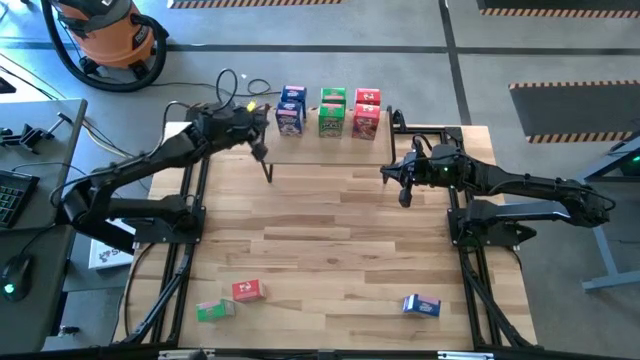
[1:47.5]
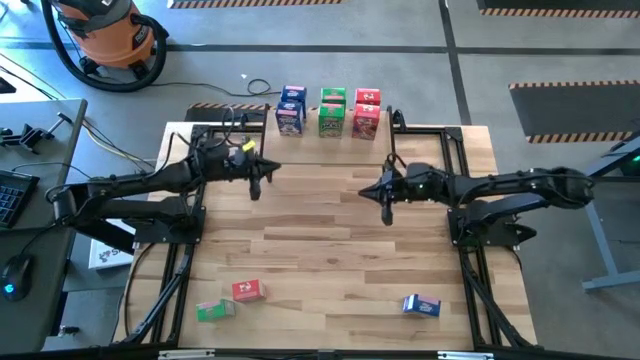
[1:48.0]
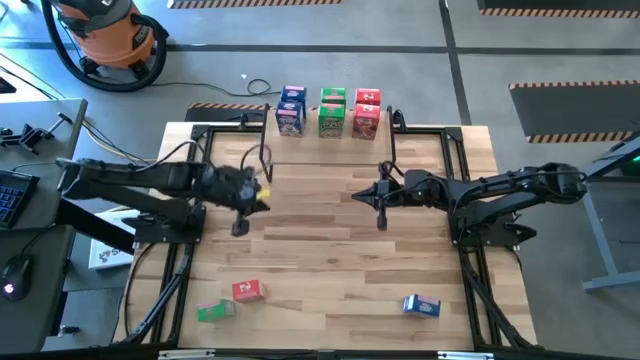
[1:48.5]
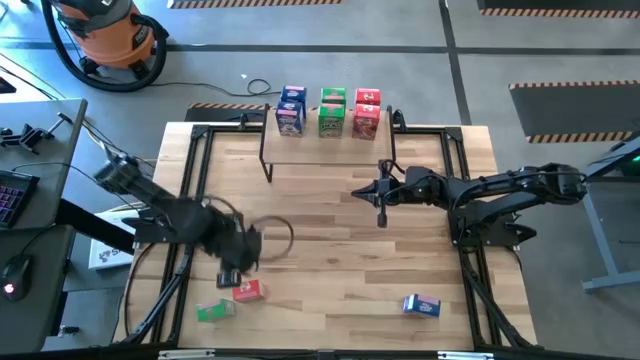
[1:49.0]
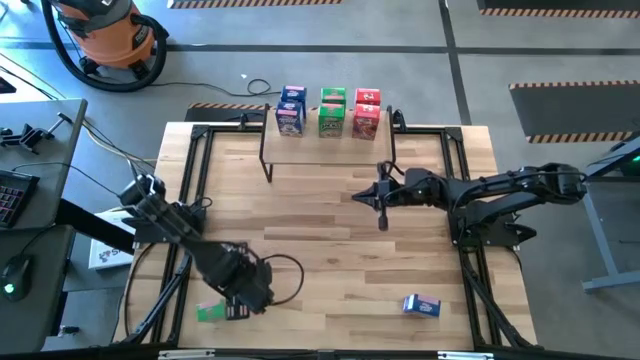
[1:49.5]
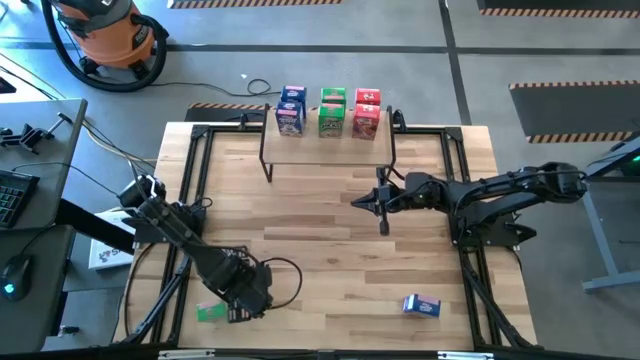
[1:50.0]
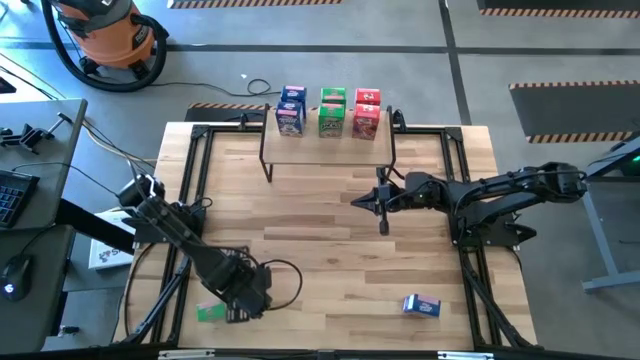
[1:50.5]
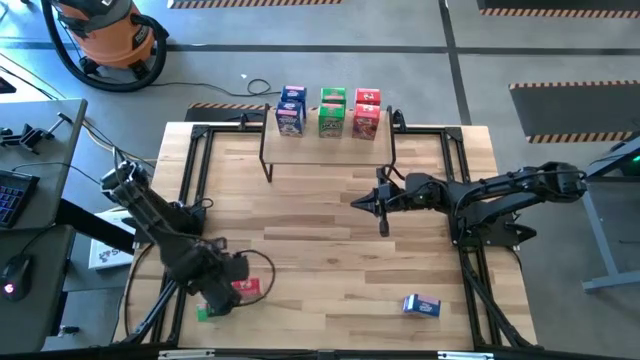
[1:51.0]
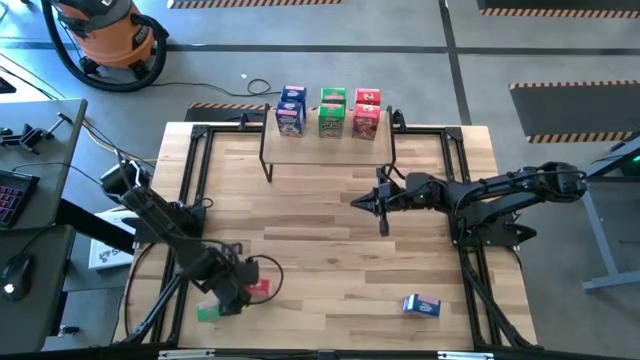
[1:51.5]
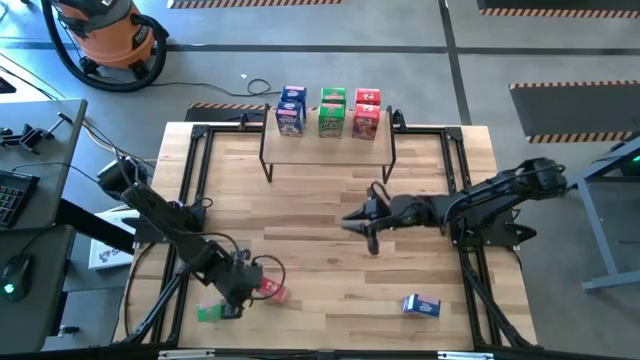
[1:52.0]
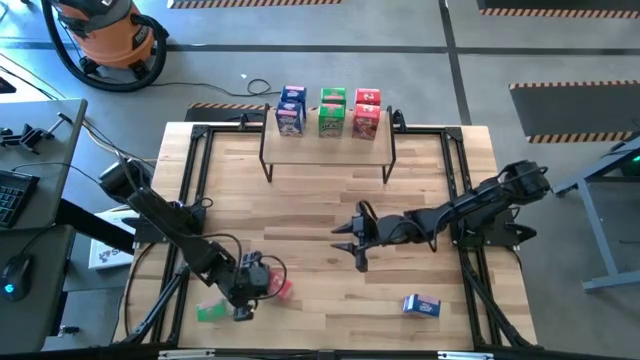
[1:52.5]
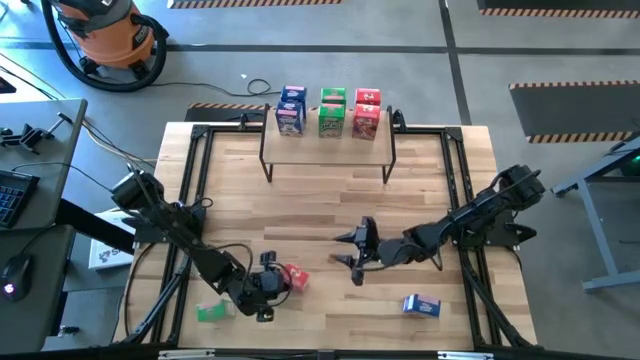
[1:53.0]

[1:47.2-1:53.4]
Task: Stack cereal on shelf
Move the red cereal box to the center of the table

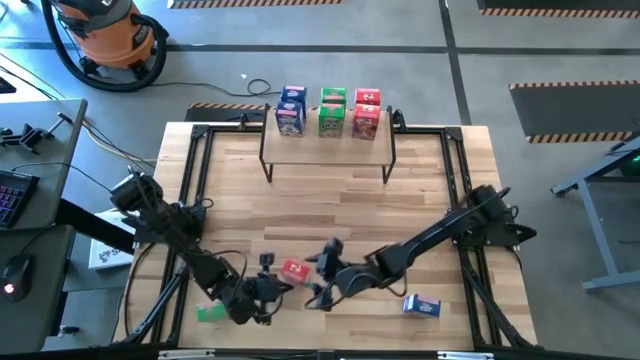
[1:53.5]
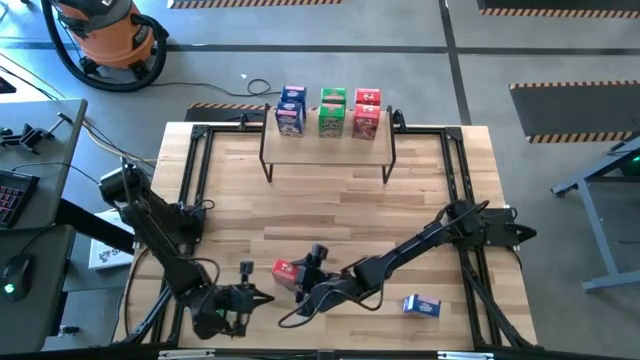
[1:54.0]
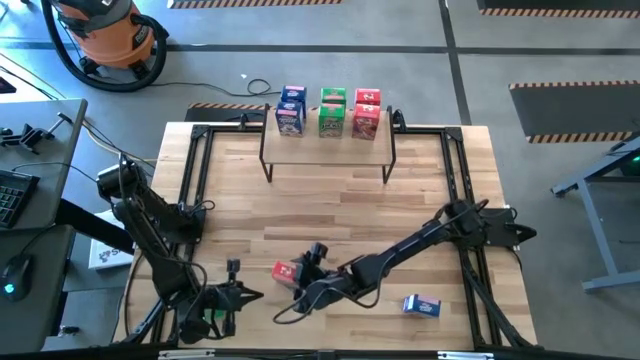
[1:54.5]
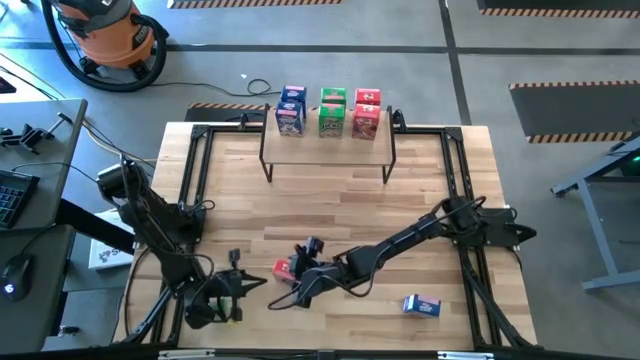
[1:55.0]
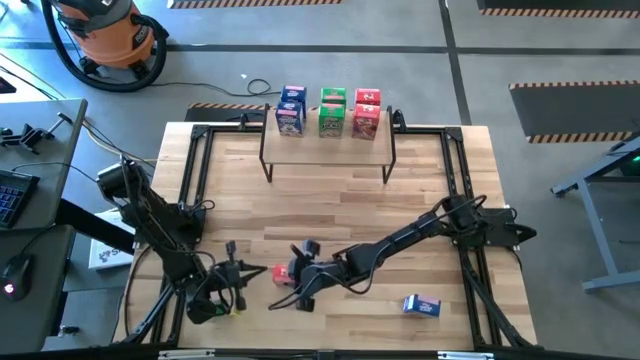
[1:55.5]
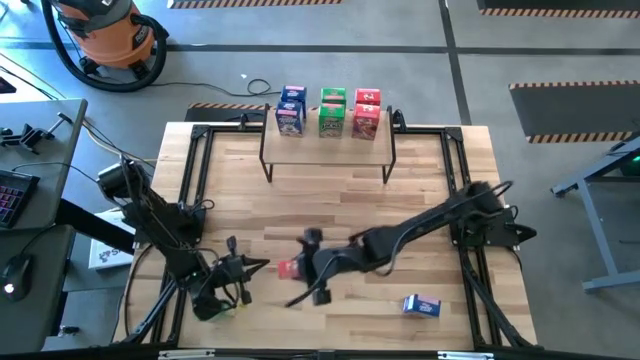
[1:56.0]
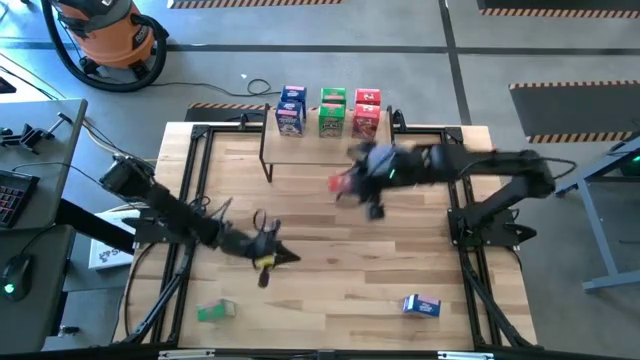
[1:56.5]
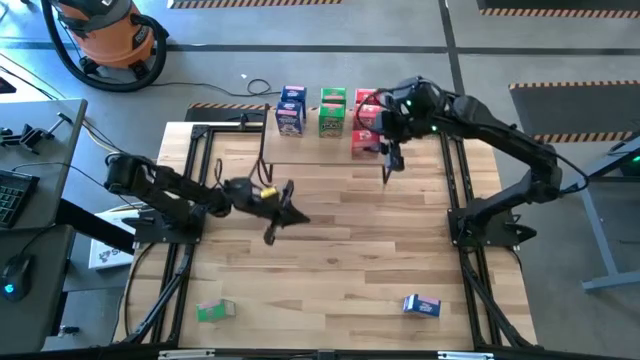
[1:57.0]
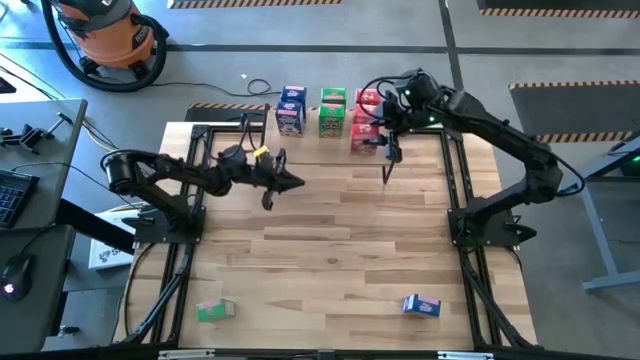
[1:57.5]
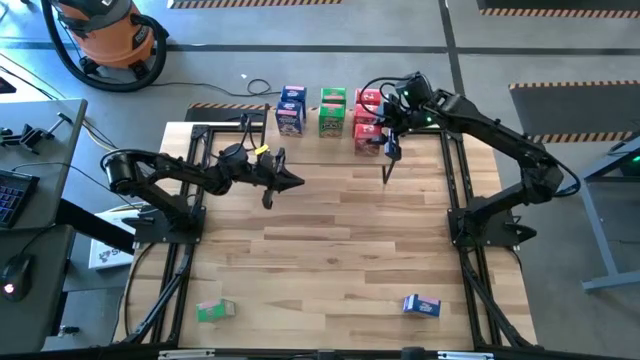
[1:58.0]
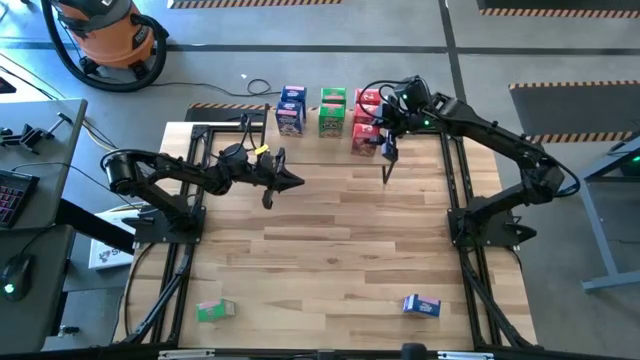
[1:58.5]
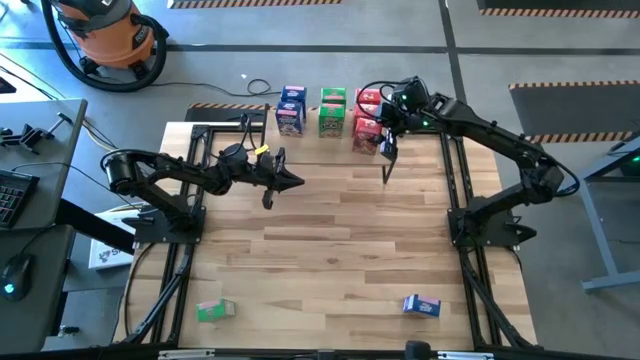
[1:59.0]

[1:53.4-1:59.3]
Put the red cereal box on the shelf aligned with the other red cereal boxes

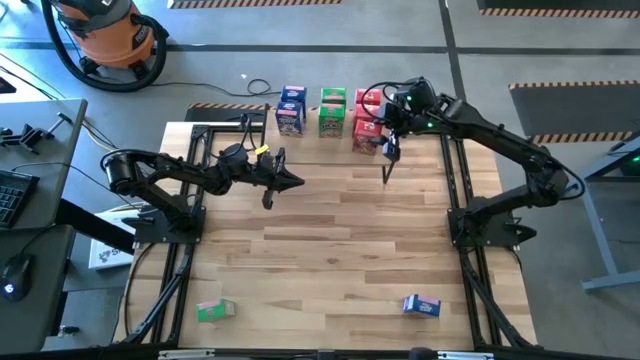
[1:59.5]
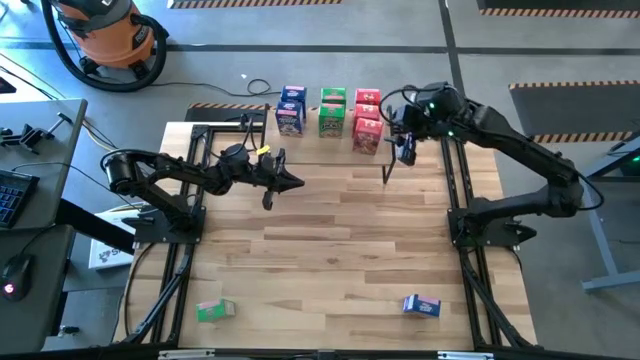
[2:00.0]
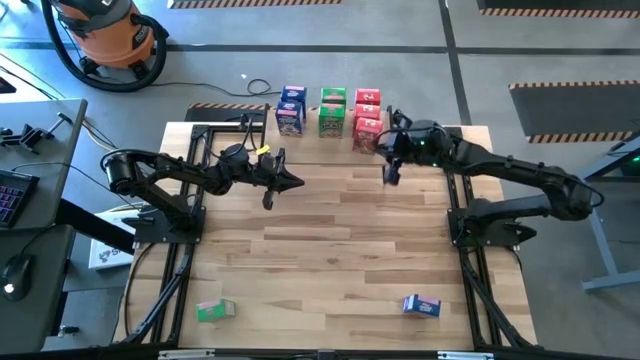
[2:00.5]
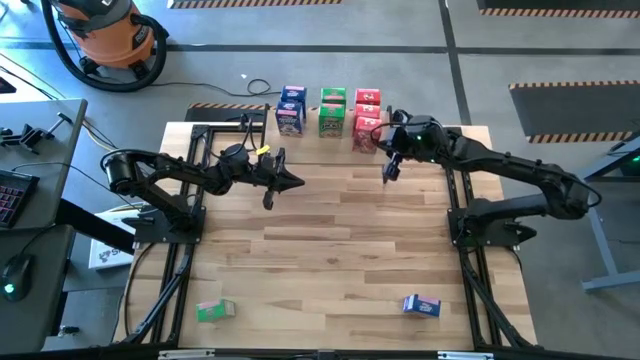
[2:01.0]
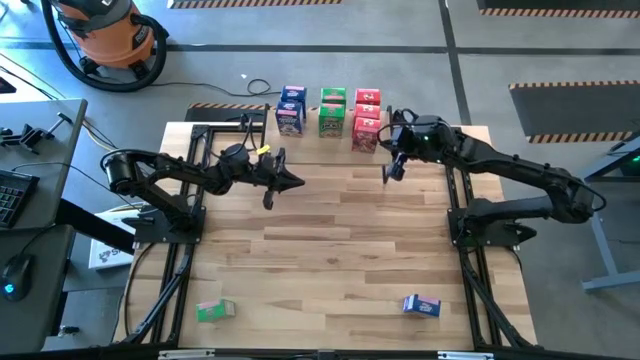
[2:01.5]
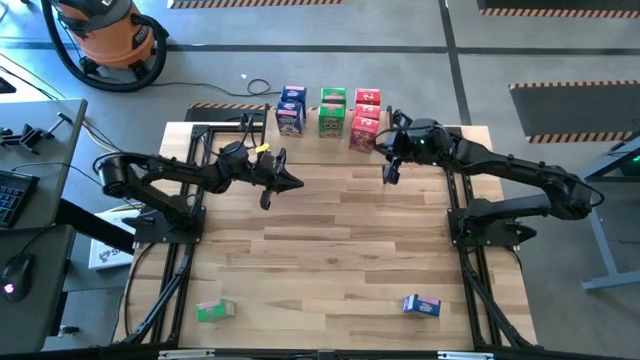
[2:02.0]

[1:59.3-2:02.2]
Adjust the bottom red cereal box on the shelf

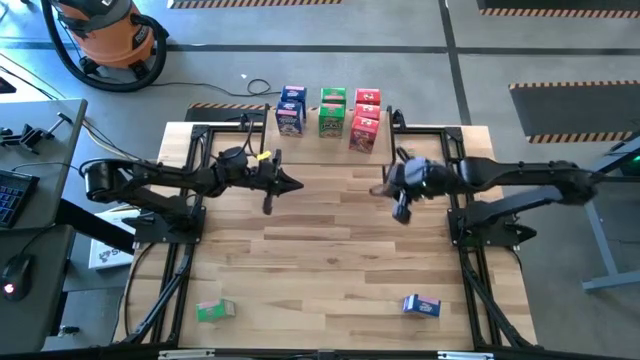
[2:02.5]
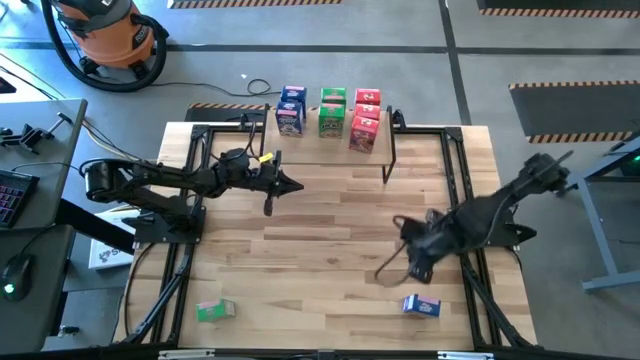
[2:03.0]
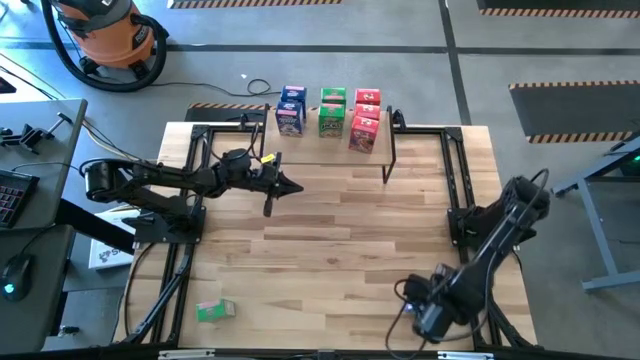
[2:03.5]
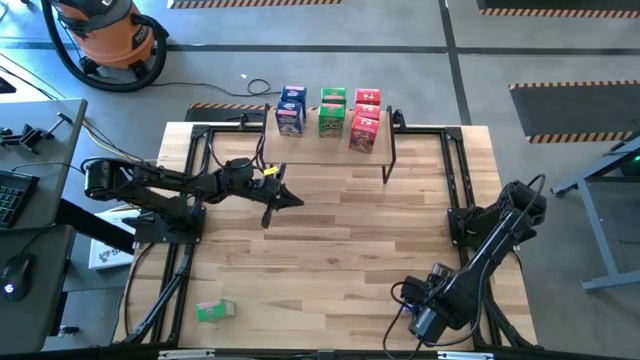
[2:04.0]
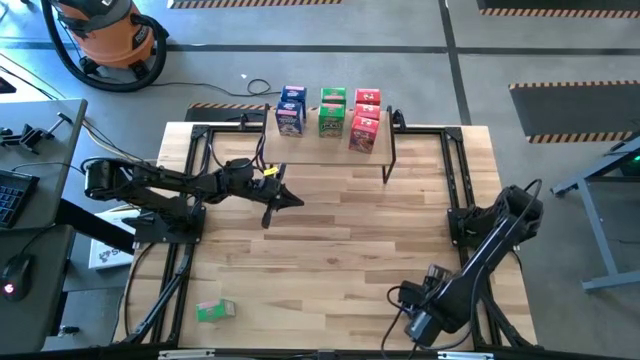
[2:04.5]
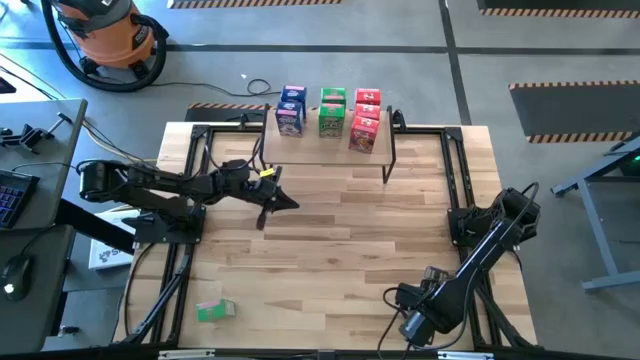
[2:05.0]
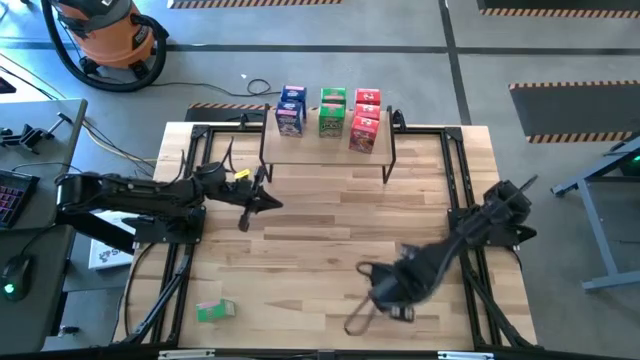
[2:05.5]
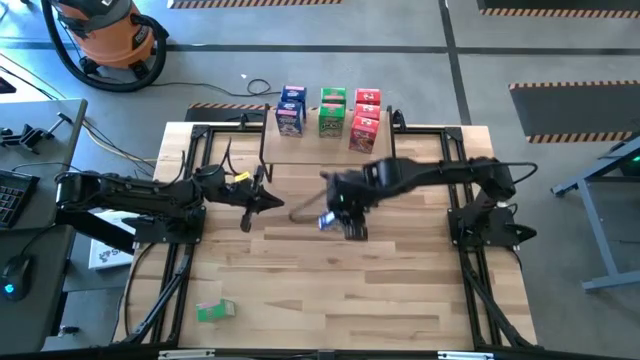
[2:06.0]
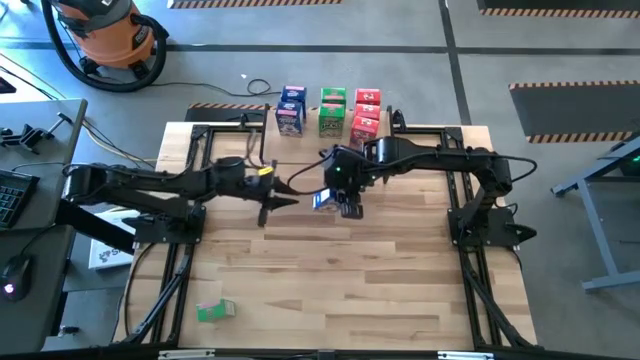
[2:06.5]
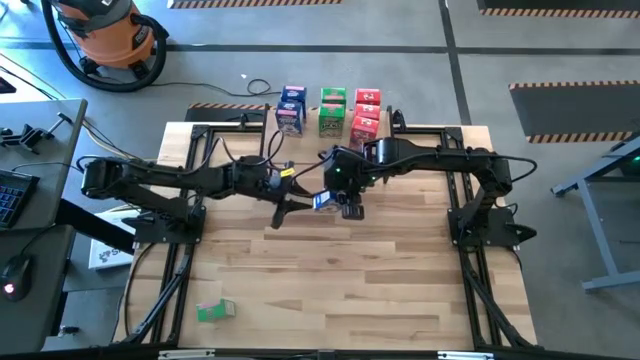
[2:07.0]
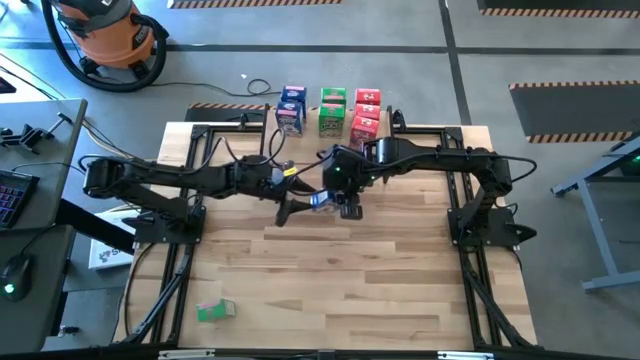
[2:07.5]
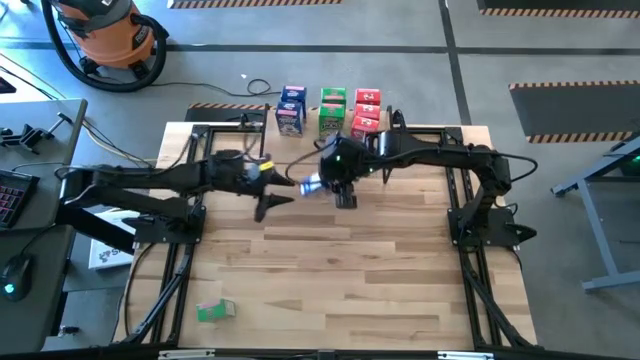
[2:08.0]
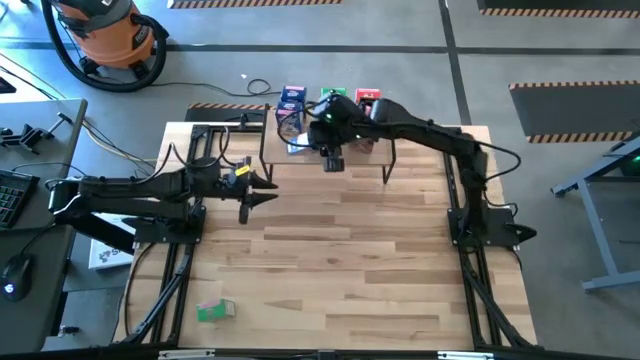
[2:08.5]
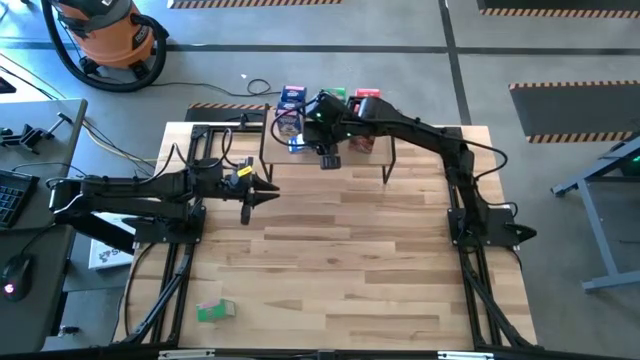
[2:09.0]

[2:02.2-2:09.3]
Put the blue cereal on the shelf aligned with the other blue cereal box
